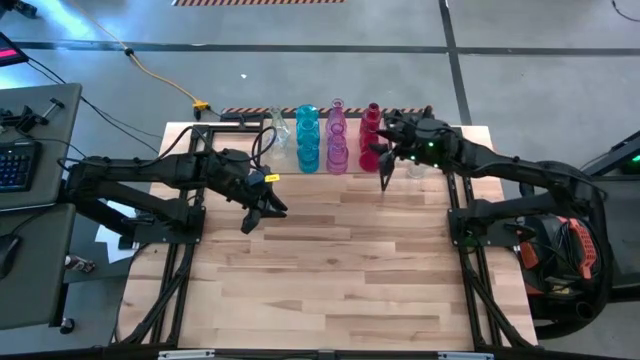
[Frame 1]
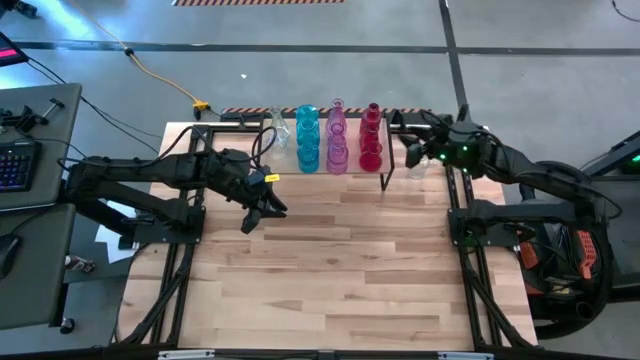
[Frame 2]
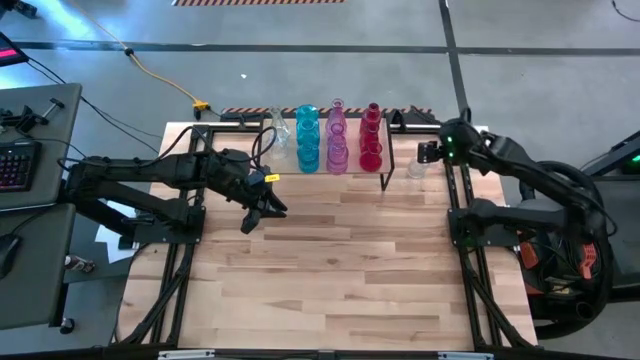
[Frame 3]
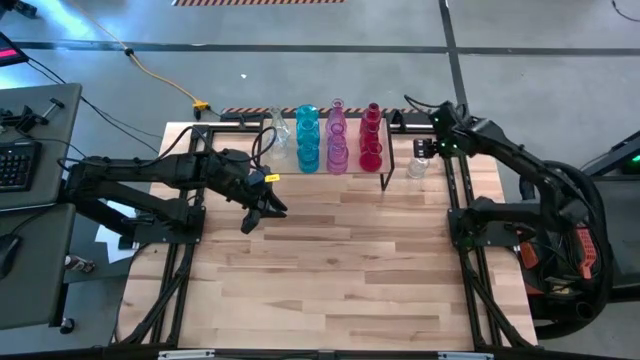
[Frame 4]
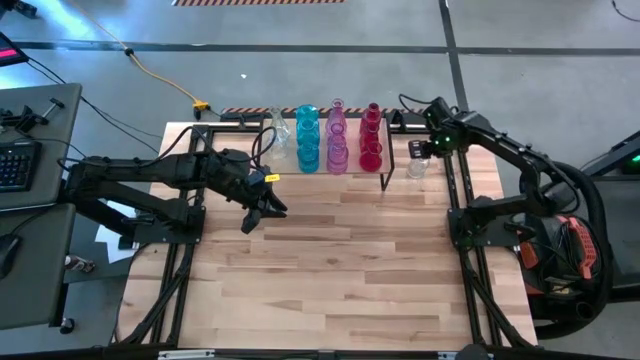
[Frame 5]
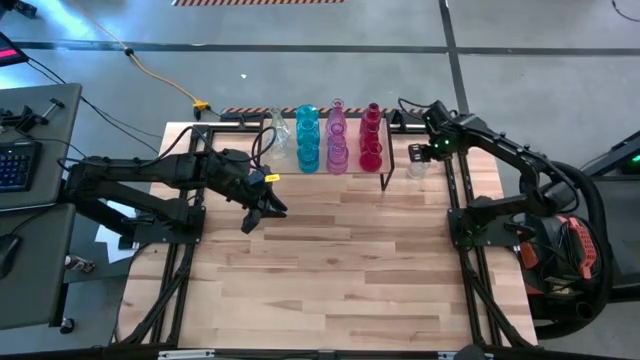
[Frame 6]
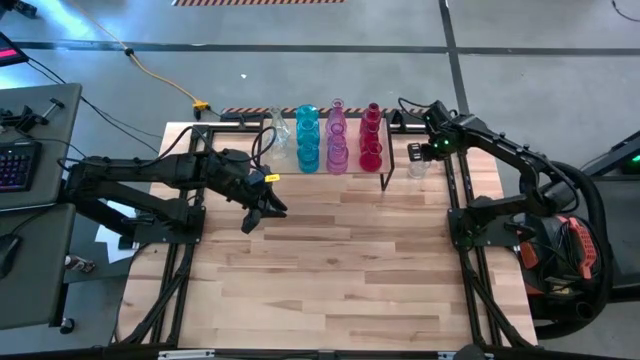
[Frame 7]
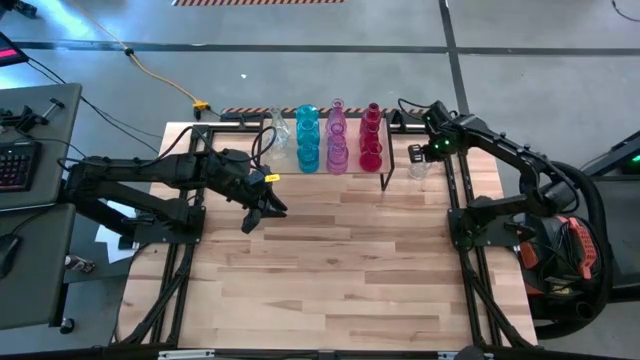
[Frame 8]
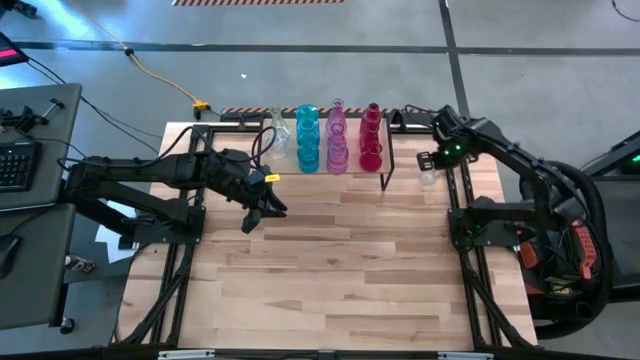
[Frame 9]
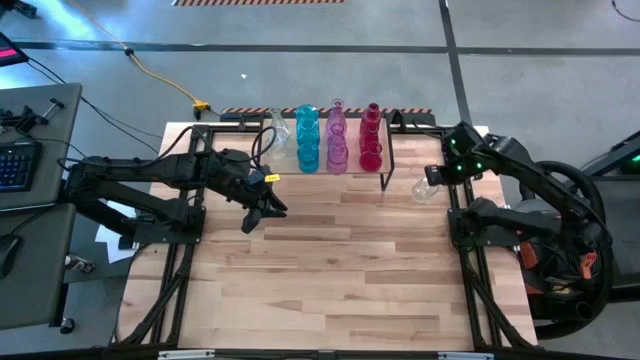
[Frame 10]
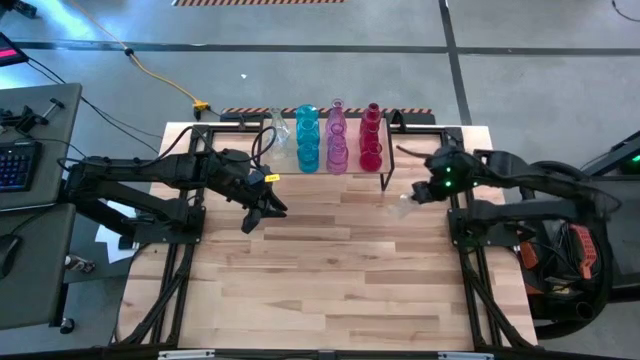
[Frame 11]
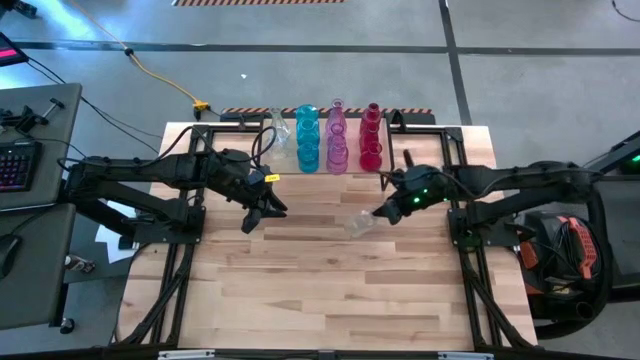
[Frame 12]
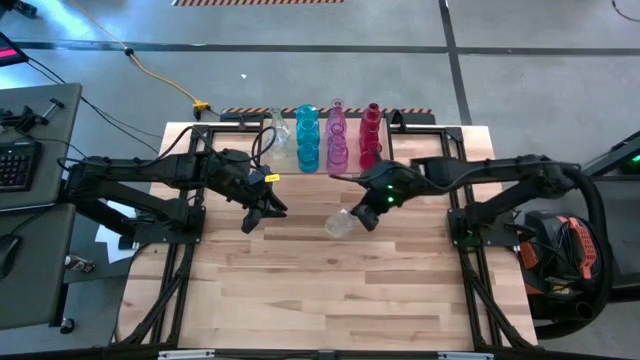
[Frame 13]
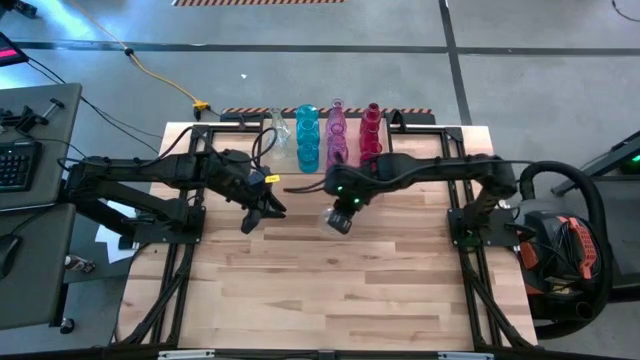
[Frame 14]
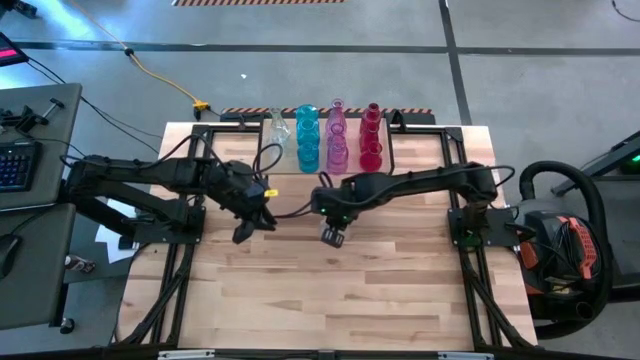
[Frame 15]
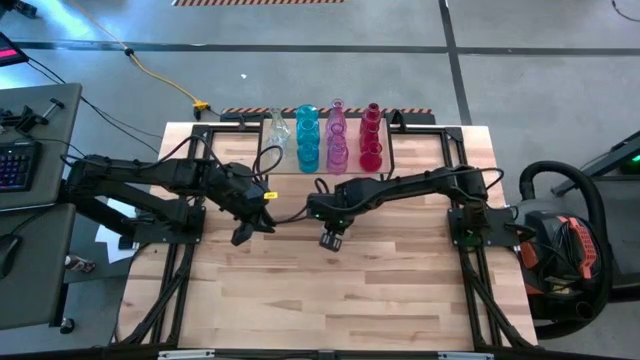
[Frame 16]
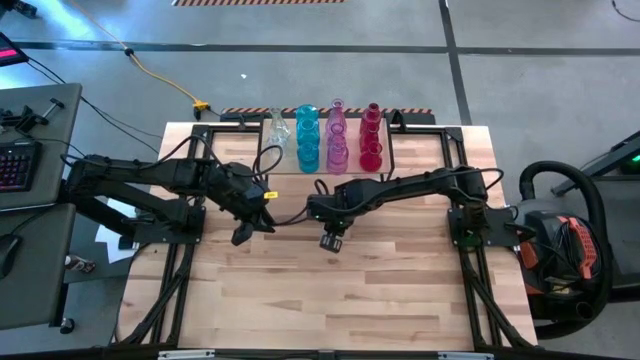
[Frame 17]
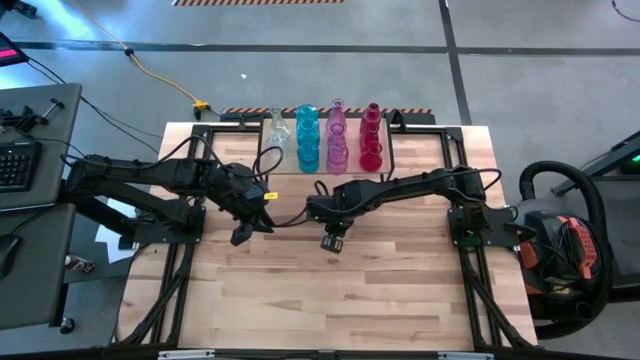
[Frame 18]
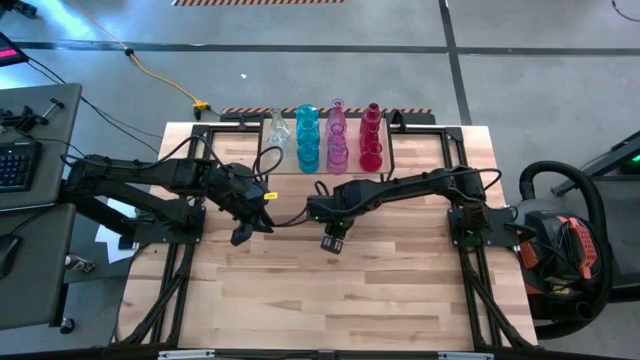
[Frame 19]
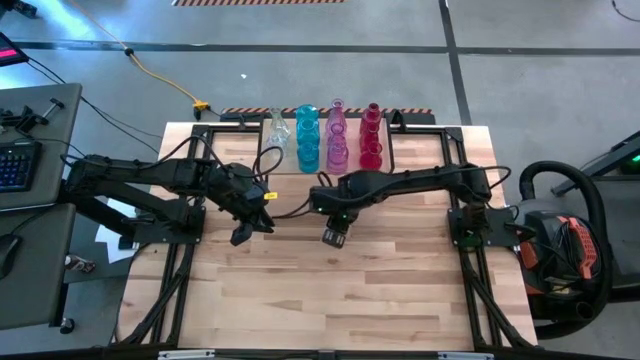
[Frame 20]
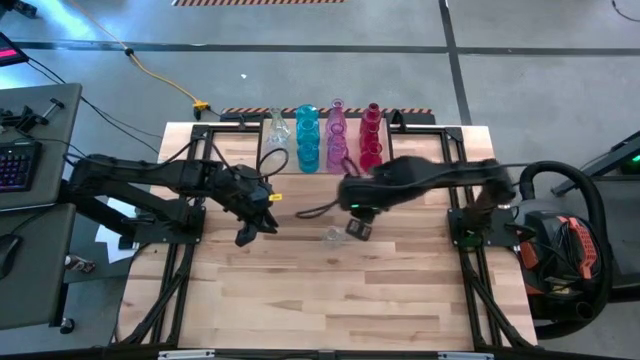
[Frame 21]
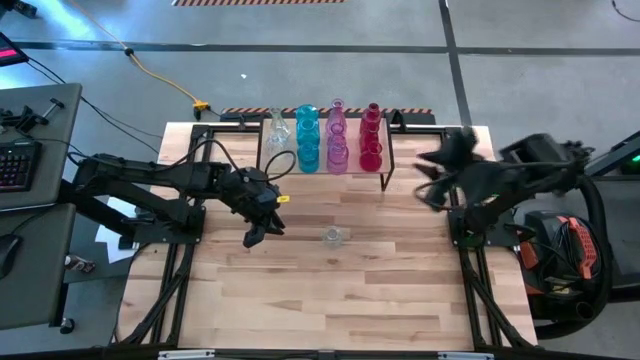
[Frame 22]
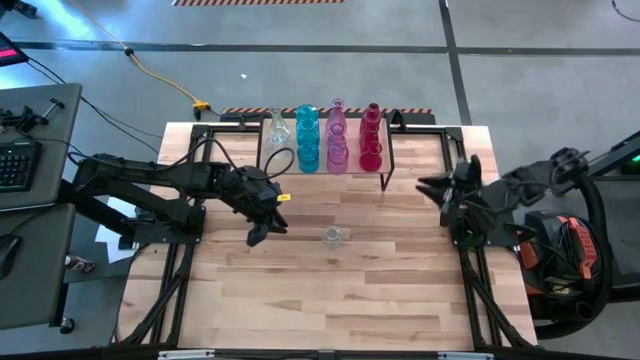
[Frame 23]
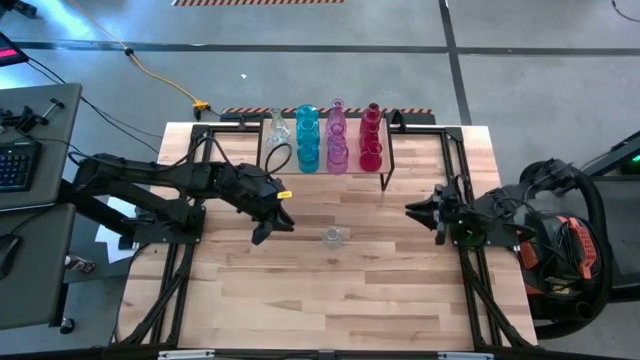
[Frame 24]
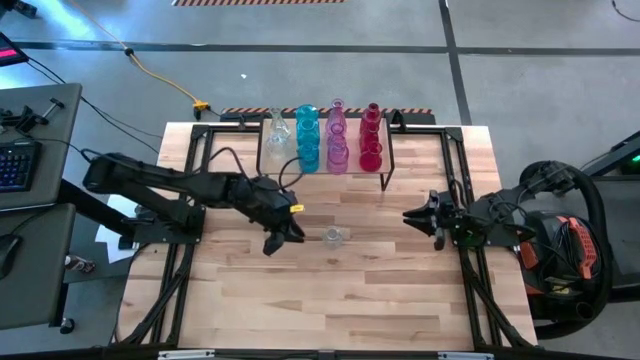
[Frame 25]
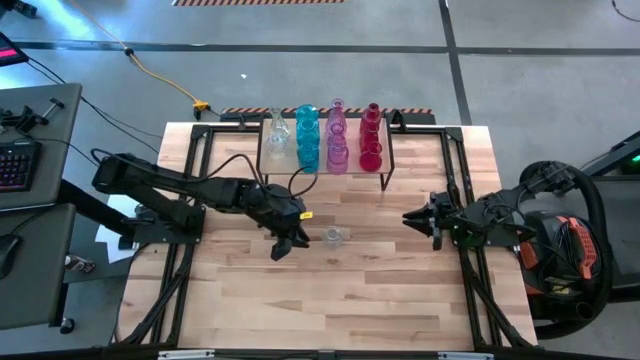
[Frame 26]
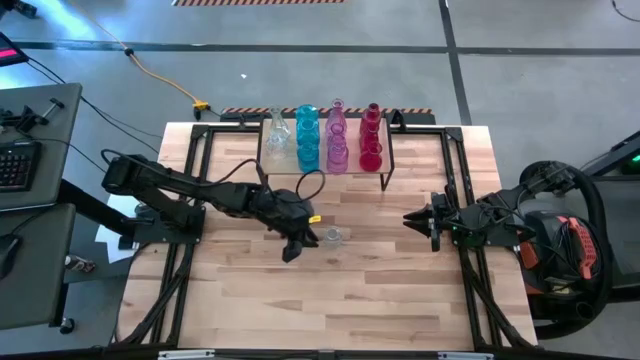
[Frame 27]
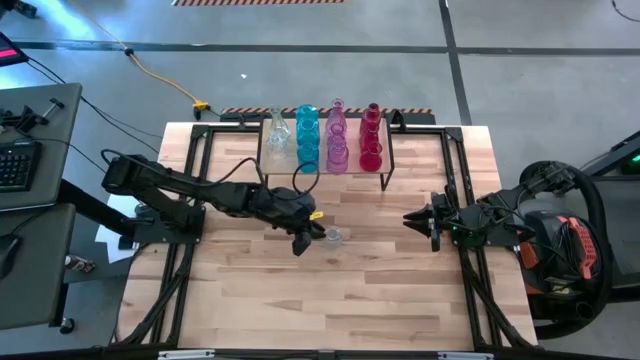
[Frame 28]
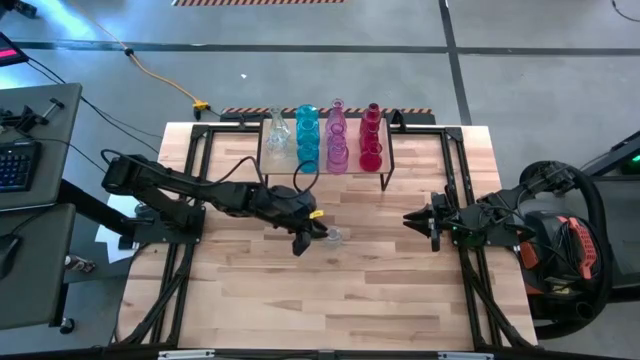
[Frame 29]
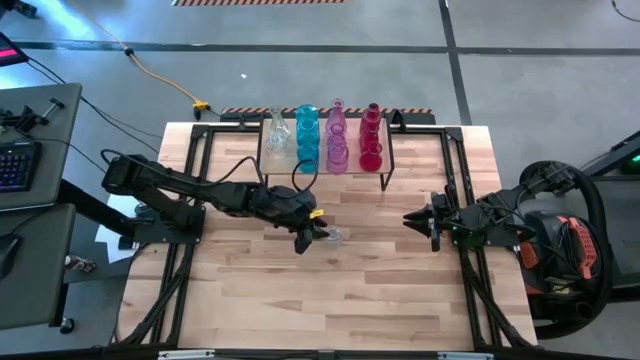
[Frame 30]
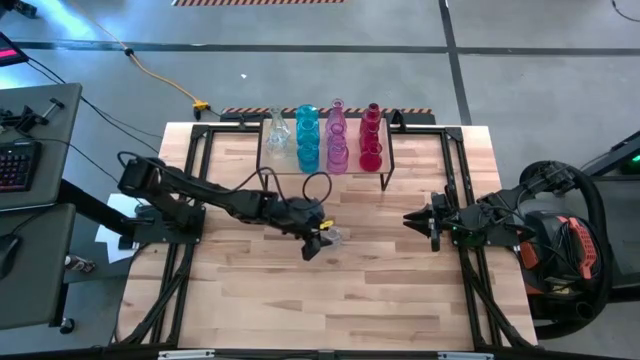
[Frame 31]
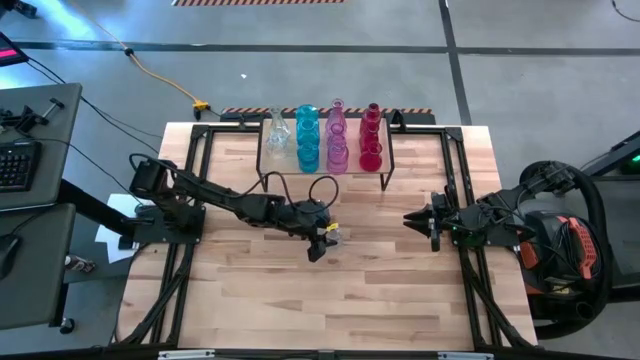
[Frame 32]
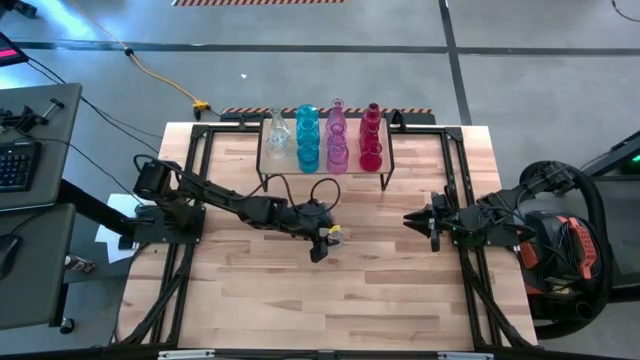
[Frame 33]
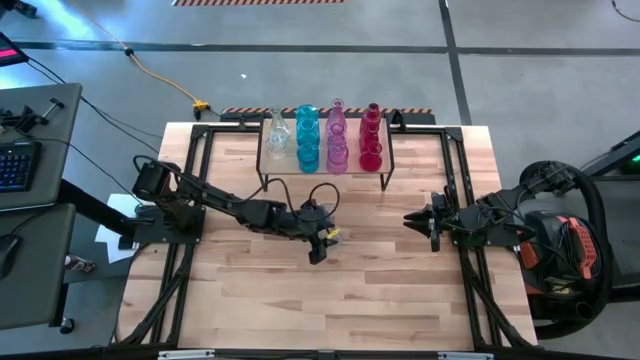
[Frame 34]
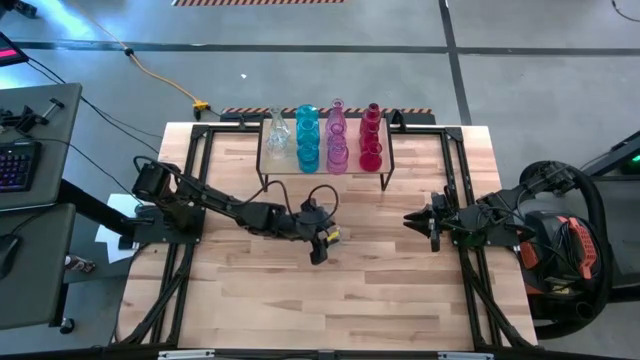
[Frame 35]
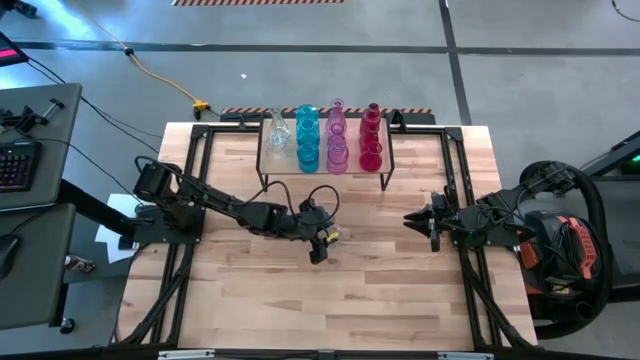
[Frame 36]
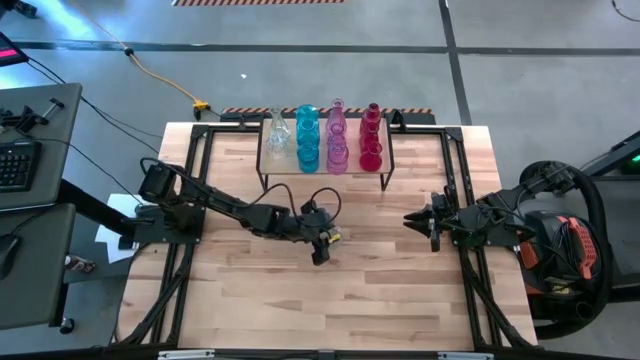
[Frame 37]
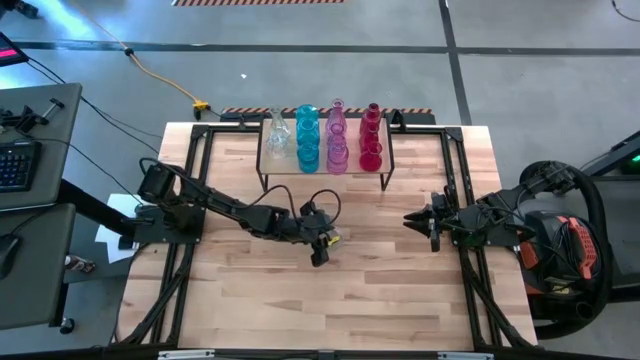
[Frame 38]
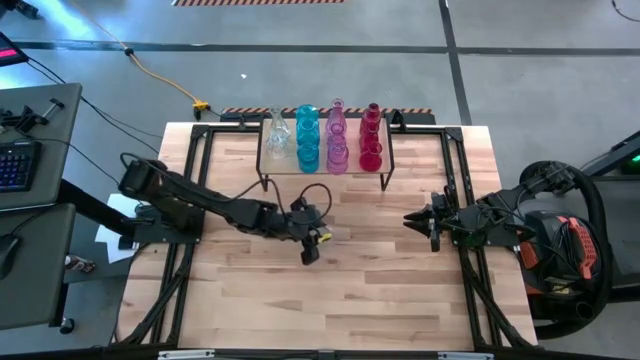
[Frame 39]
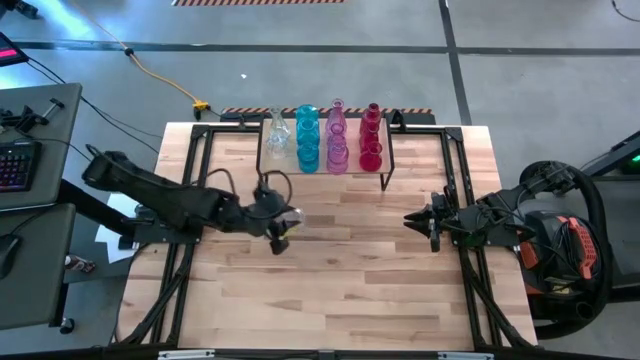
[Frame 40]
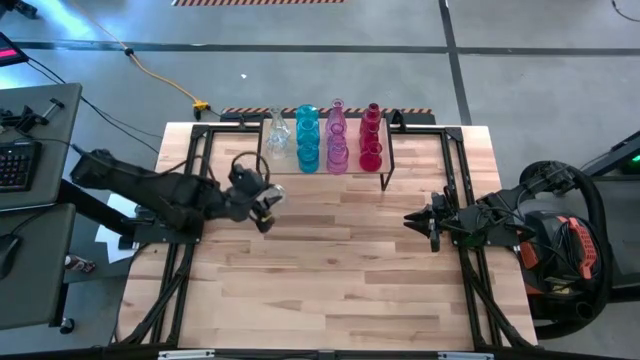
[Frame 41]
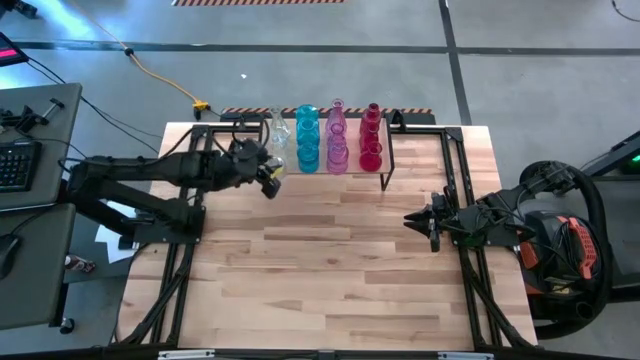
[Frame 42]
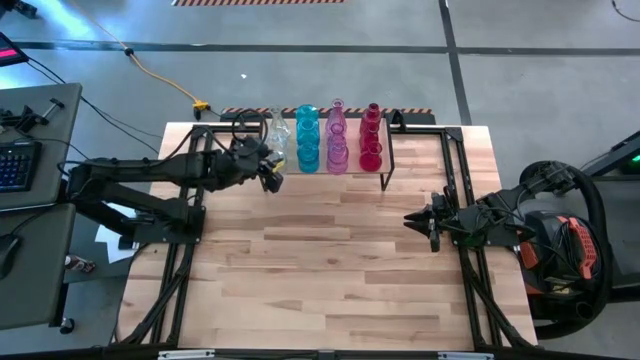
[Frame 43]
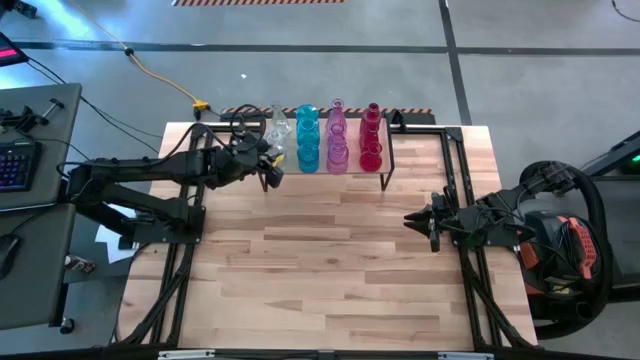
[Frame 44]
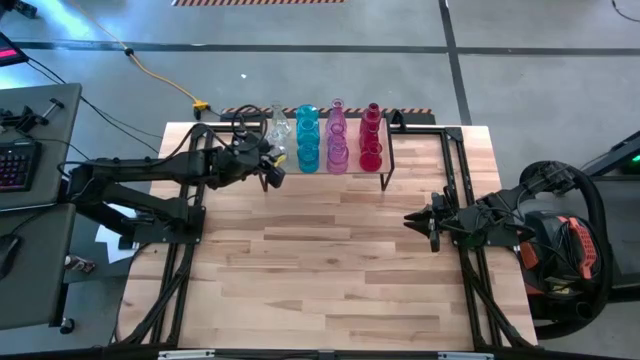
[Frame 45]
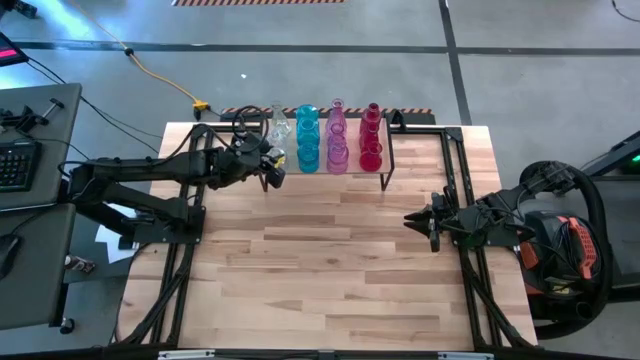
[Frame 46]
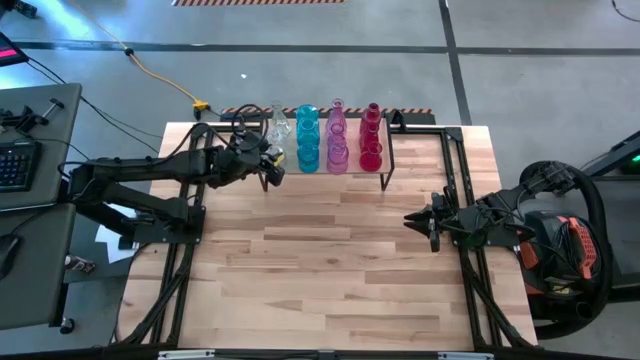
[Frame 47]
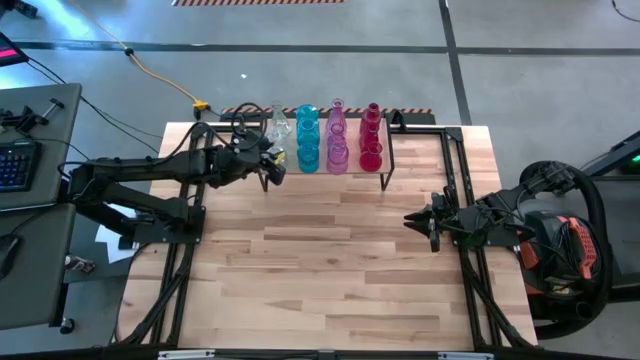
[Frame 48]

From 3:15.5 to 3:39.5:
Task: sort vases onto shelf
Put the transparent flower vase on the shelf aligned with the other transparent flower vases
